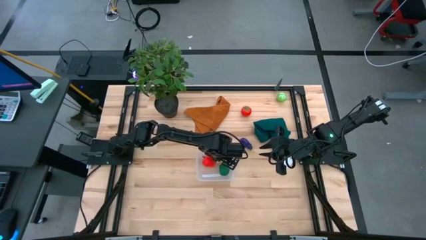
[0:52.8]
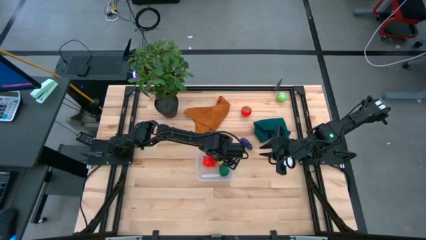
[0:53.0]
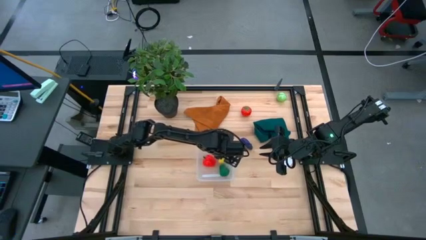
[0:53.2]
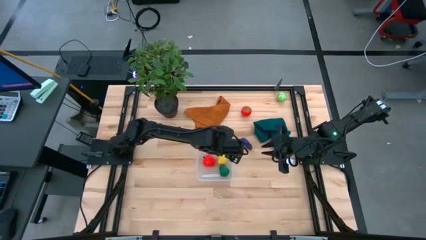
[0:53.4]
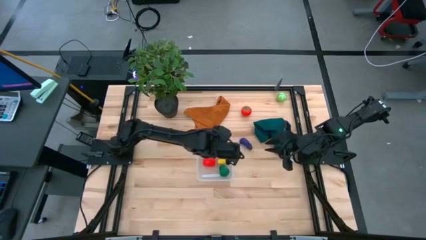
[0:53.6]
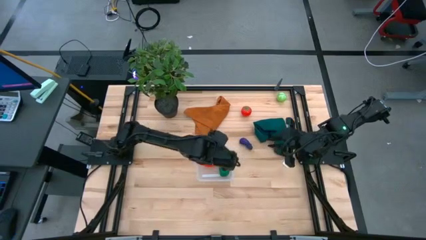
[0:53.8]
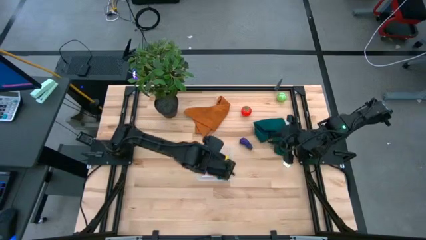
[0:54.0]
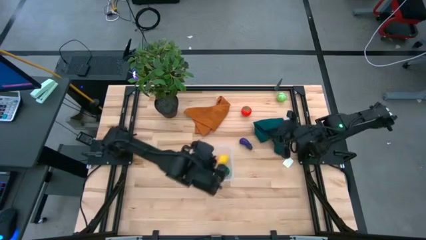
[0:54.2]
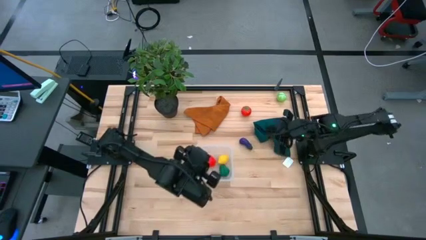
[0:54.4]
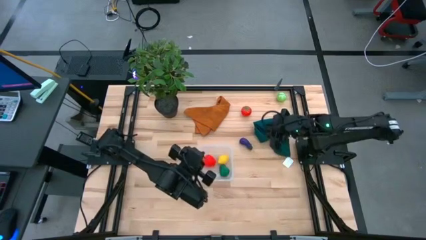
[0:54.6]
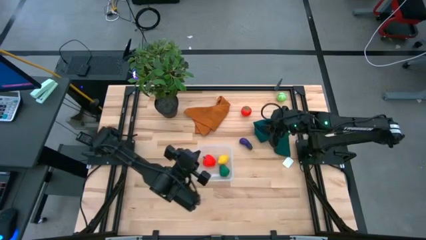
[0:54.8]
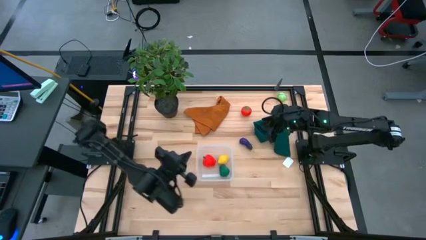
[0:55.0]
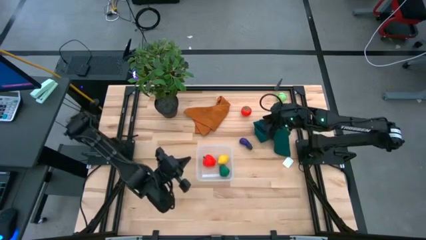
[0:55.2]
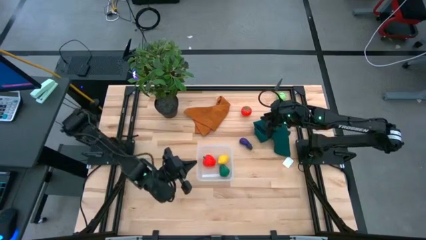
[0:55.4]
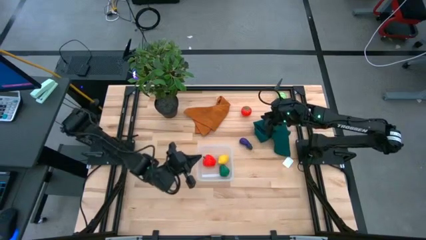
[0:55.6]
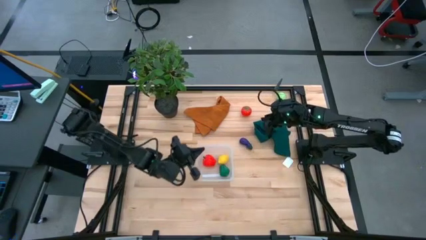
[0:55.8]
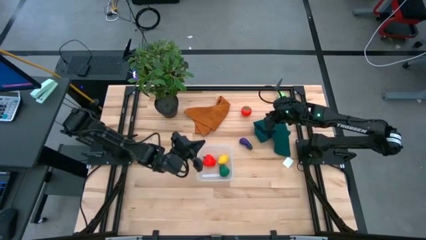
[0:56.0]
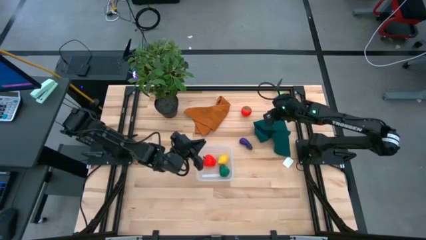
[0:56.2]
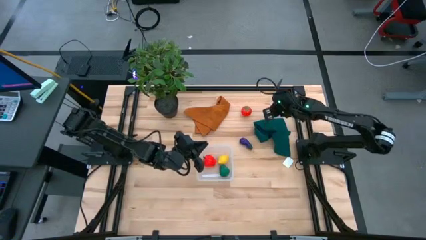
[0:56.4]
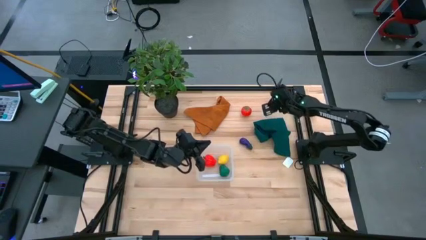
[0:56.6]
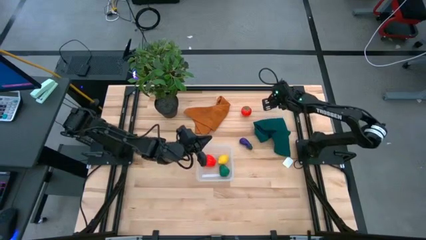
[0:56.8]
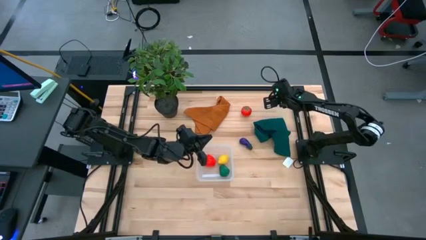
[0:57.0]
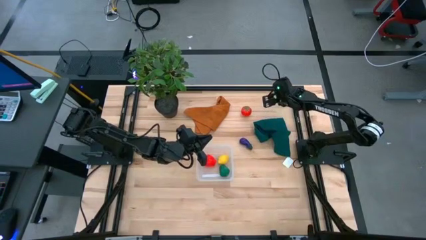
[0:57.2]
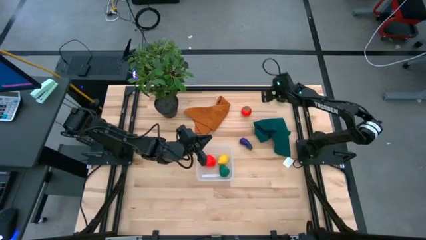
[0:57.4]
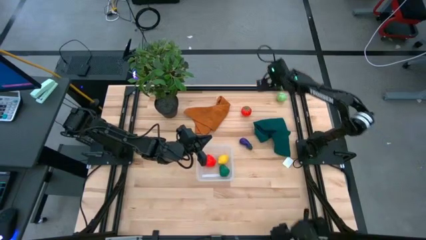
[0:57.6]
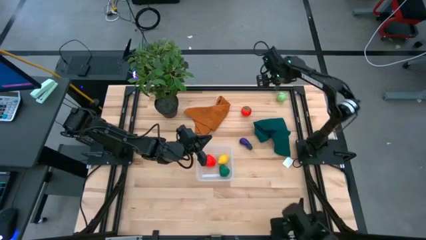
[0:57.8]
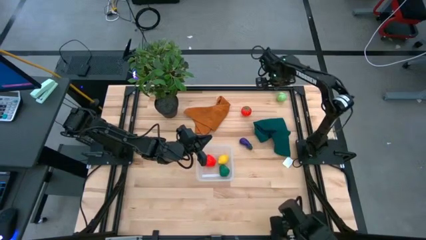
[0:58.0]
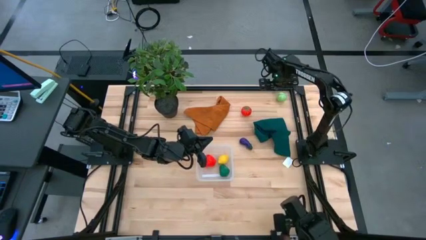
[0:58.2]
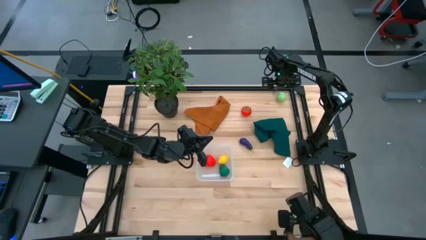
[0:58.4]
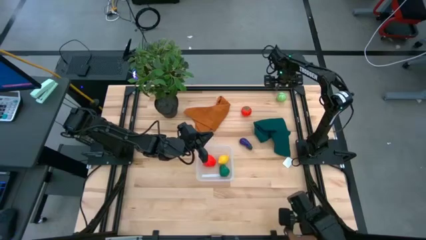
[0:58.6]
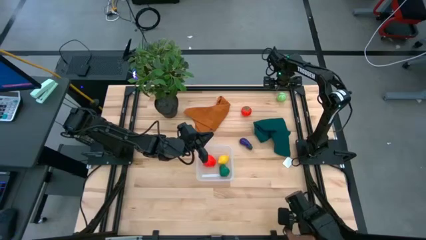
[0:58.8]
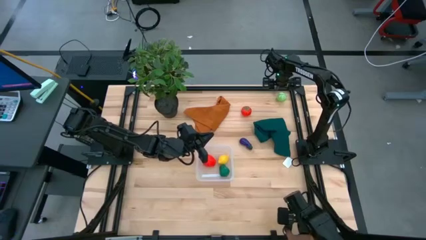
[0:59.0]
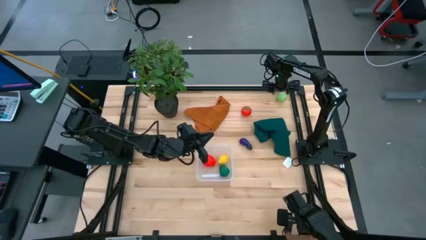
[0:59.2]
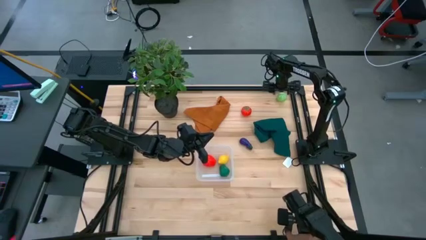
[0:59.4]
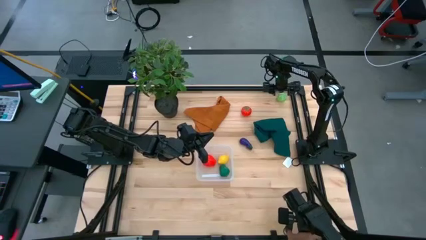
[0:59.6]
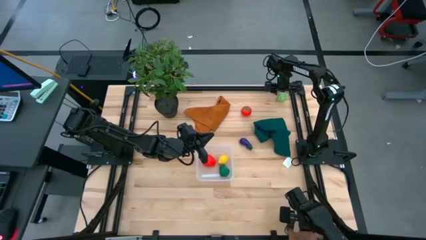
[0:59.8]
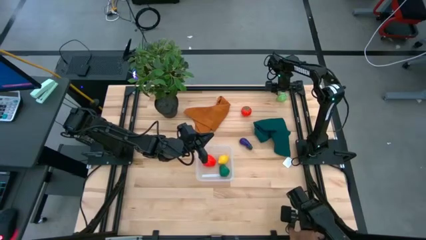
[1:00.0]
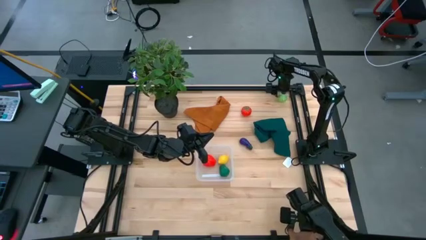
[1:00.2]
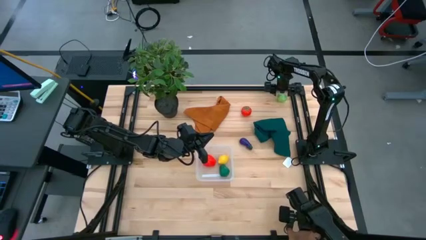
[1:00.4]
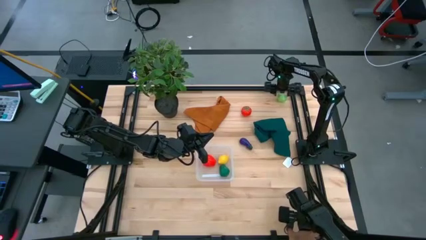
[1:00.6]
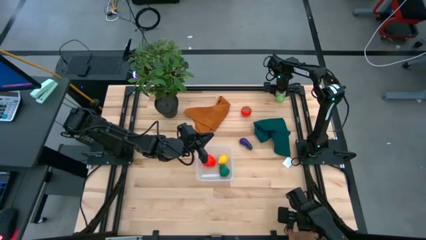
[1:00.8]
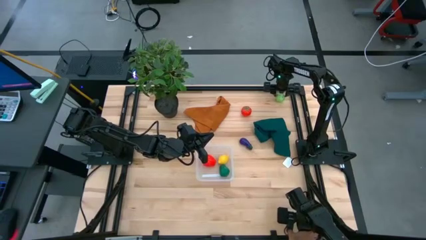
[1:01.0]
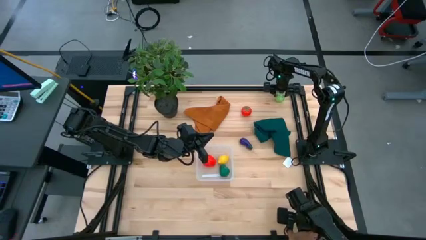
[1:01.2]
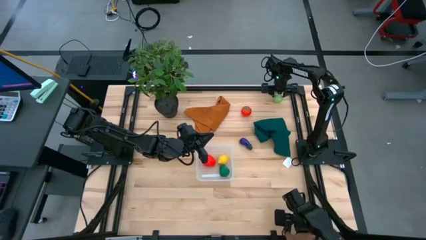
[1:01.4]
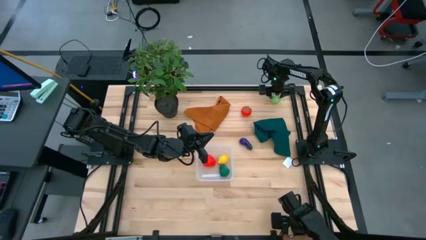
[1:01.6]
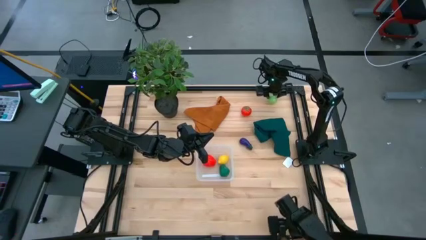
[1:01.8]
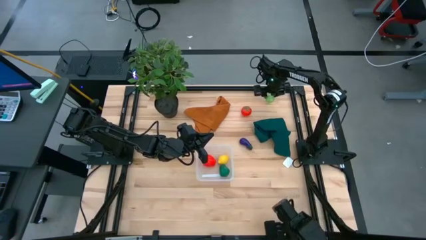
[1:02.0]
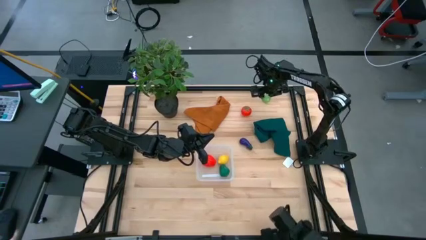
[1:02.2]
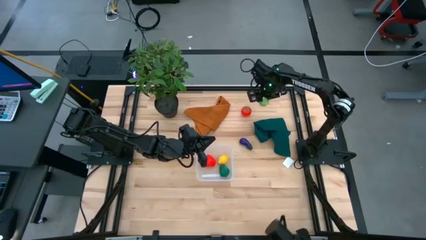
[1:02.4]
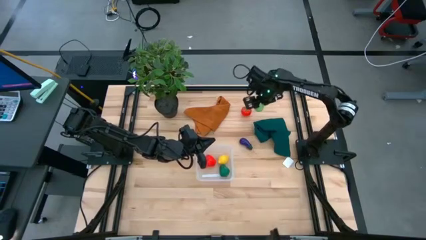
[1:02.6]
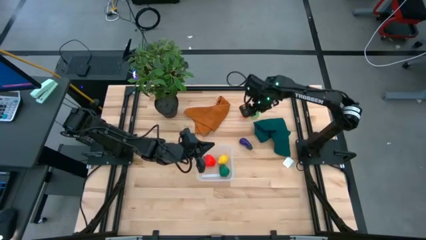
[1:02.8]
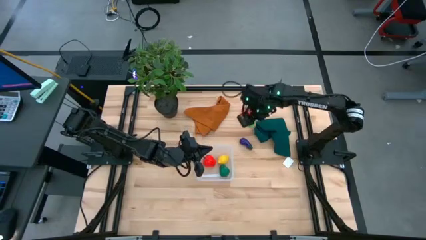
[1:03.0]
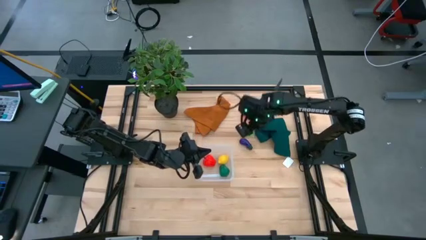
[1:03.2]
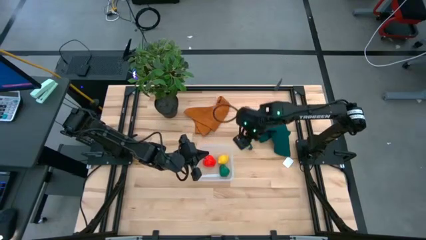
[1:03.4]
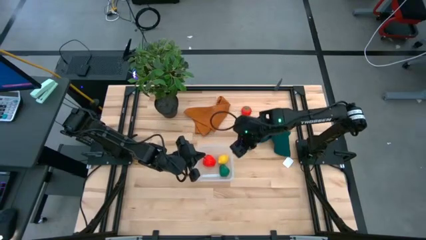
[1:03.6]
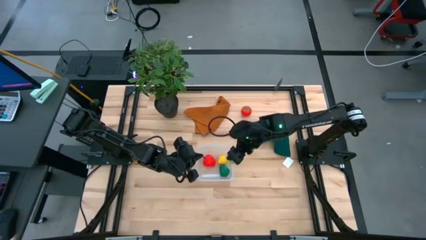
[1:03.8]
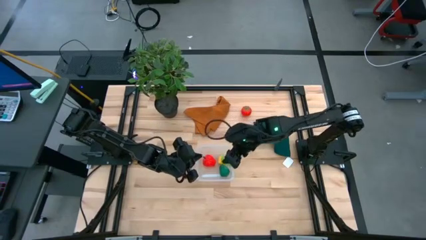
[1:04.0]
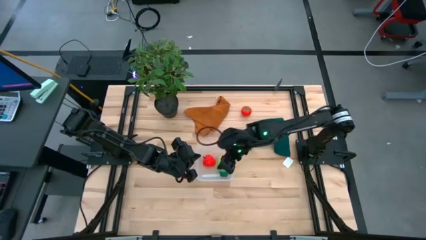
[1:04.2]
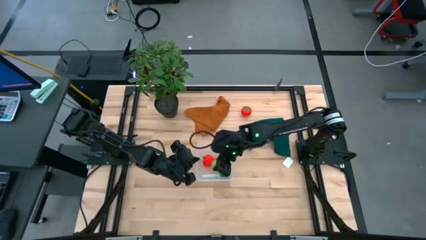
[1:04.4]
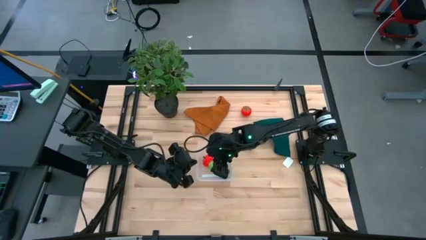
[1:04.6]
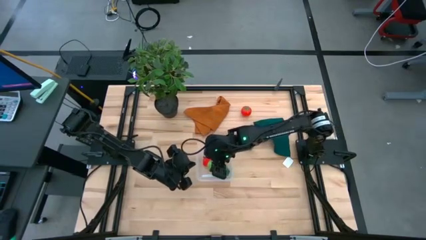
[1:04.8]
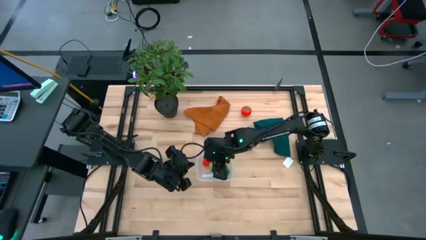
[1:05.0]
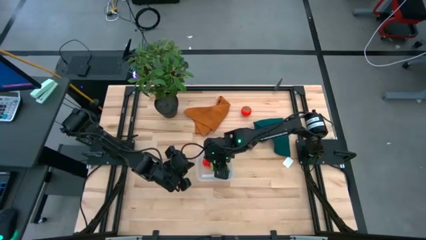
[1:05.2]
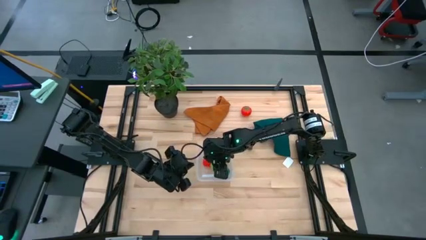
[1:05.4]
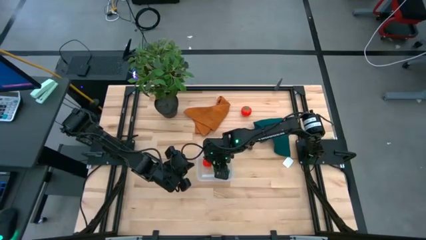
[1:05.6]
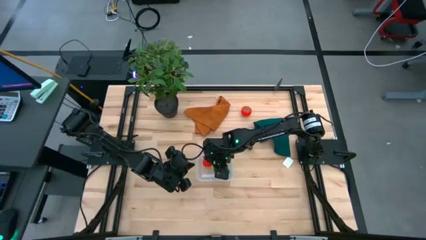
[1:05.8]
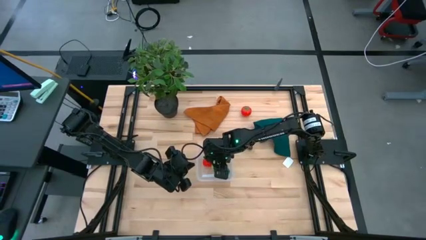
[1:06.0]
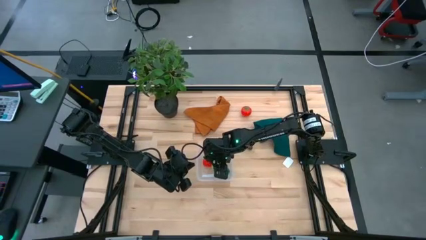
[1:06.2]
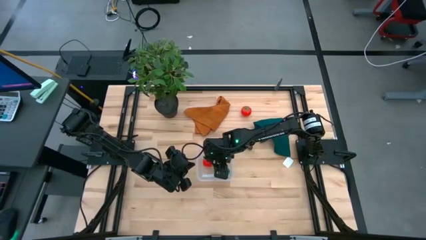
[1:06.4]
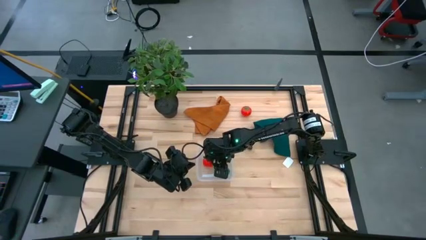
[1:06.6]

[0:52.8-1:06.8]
Task: Pick and placing Produce into tupperware
Put the cabbage into the transparent bin

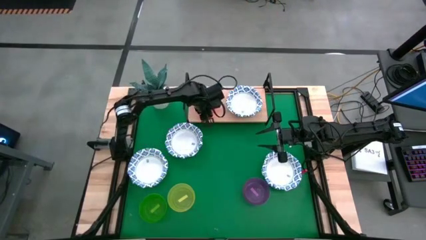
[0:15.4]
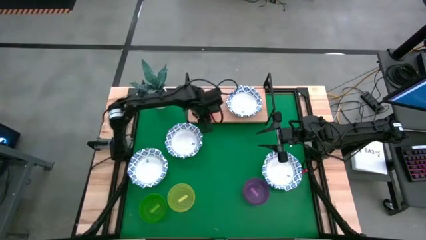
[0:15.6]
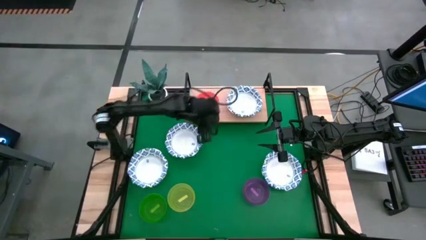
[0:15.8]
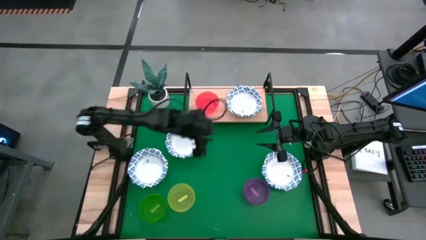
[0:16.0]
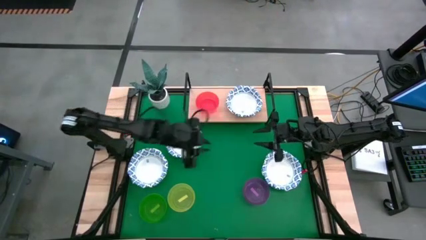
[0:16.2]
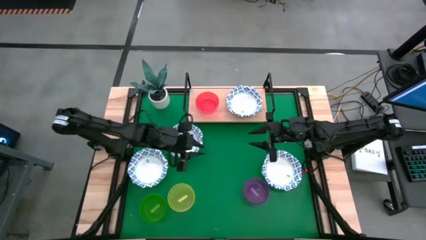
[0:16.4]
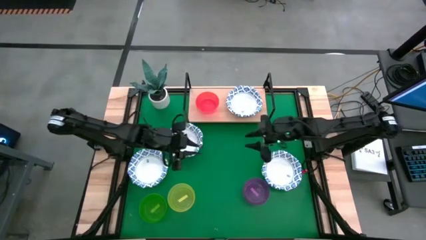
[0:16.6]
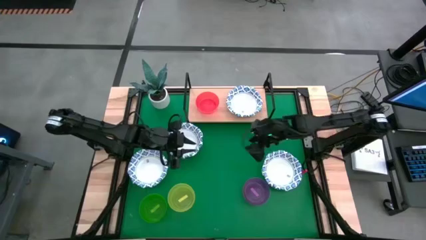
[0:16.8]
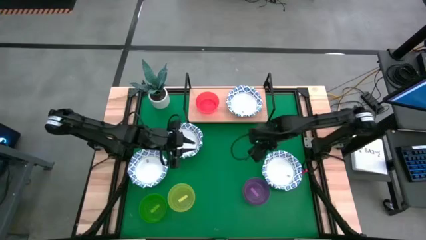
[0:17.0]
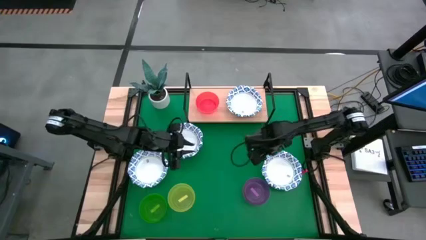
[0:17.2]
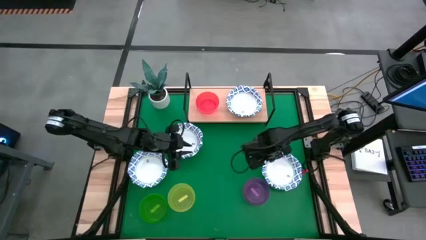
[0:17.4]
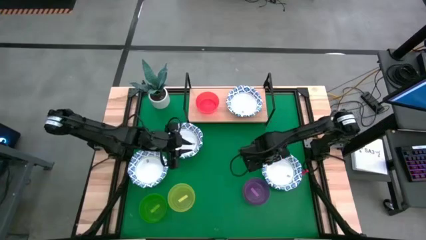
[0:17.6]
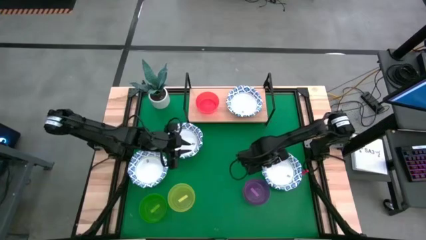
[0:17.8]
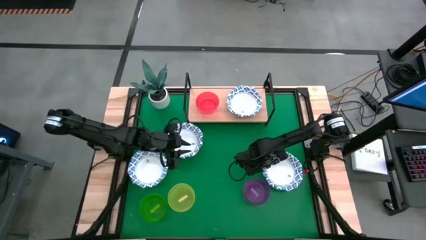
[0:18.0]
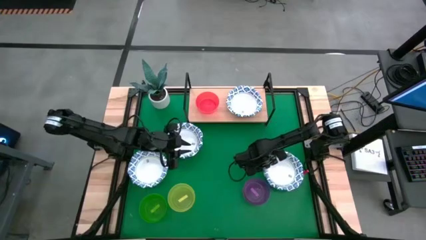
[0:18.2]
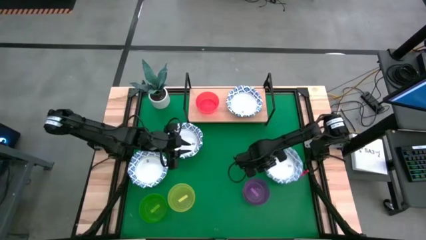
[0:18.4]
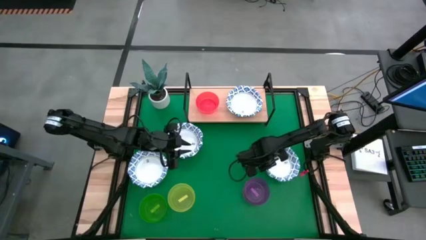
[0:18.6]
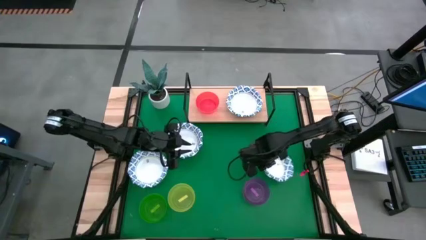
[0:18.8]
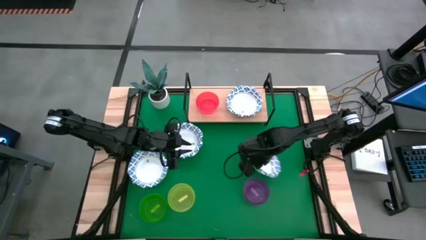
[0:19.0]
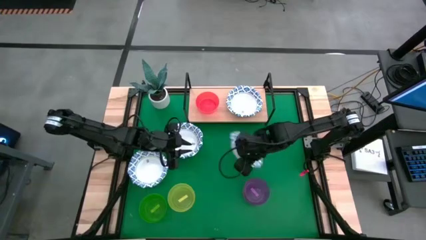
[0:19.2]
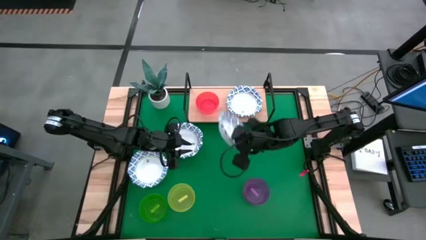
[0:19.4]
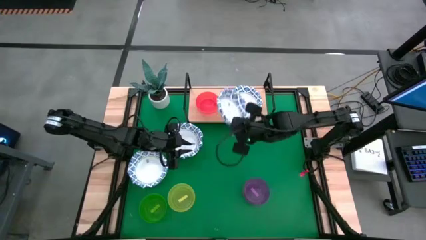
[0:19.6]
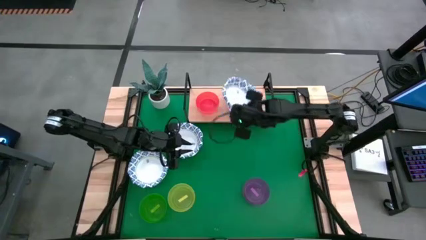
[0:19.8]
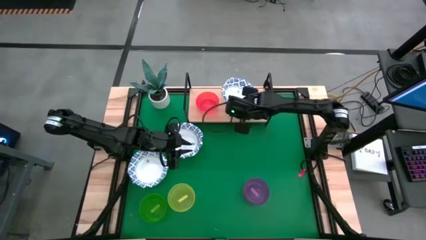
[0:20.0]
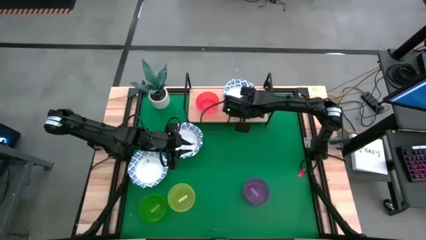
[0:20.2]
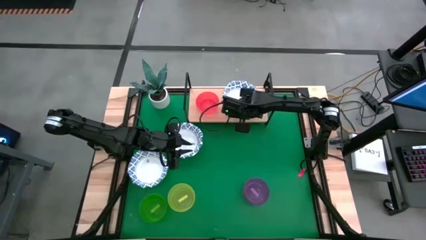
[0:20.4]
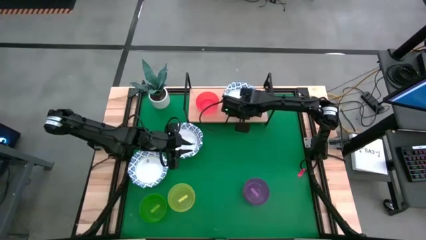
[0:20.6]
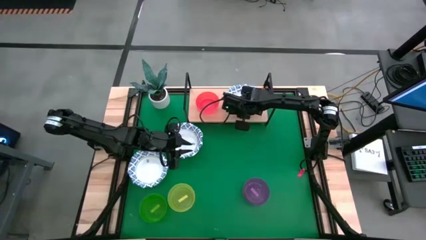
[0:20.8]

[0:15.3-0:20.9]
Task: Place and stack bowls onto a shelf
Stack the white patterned bowl on top of the white patterned bowl on the shelf
